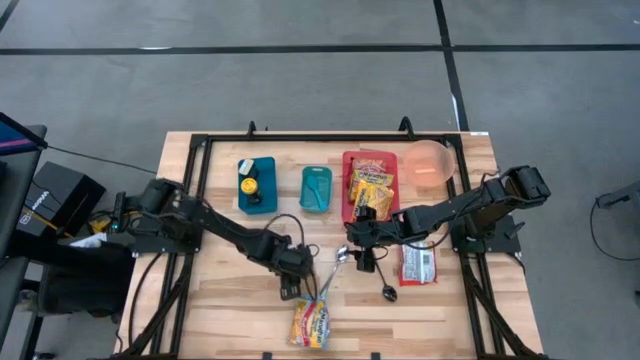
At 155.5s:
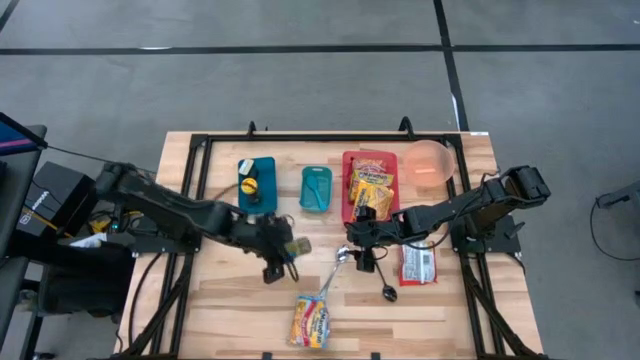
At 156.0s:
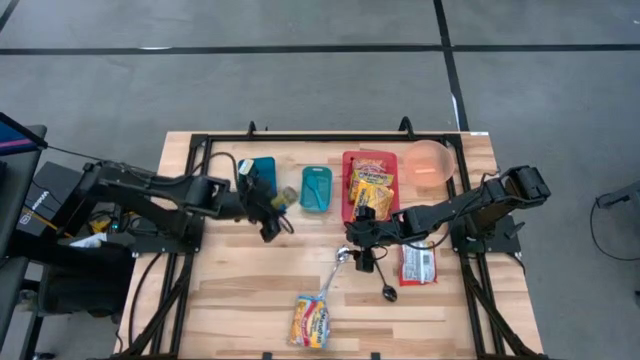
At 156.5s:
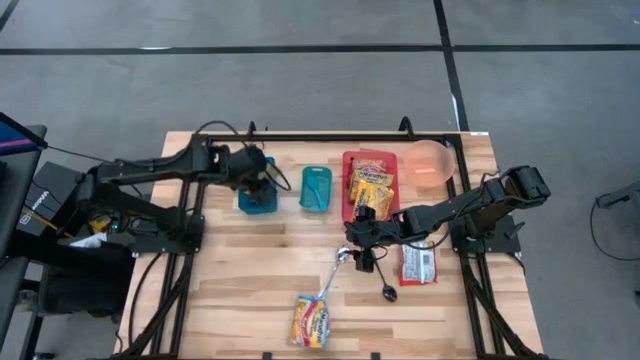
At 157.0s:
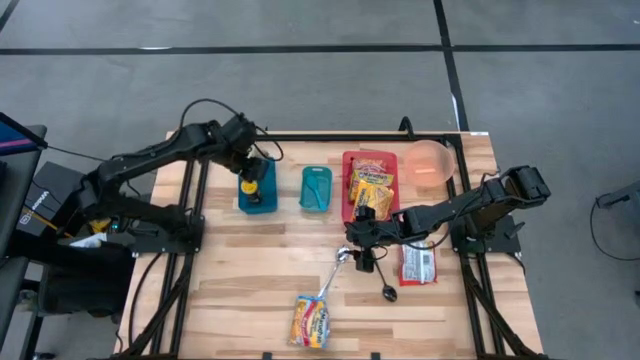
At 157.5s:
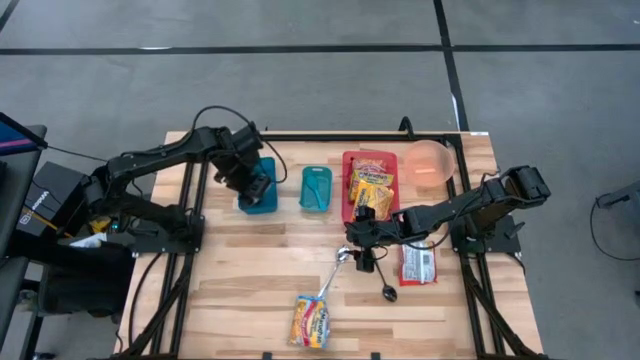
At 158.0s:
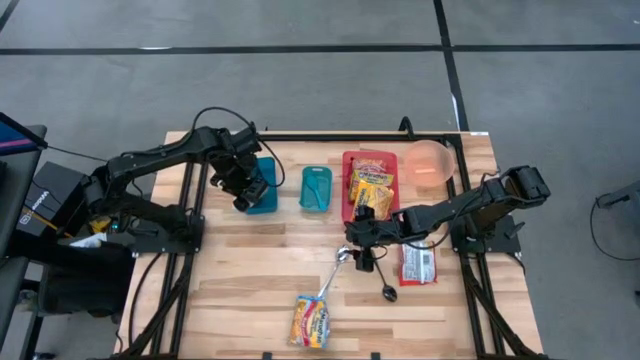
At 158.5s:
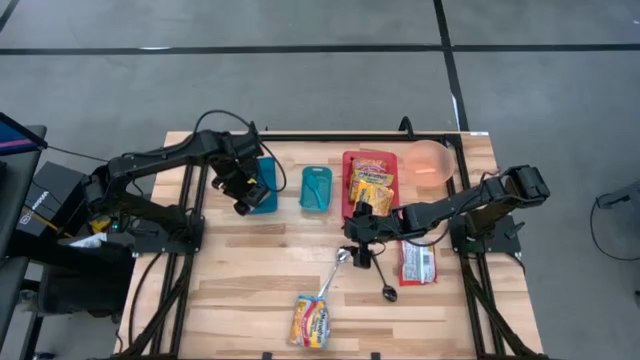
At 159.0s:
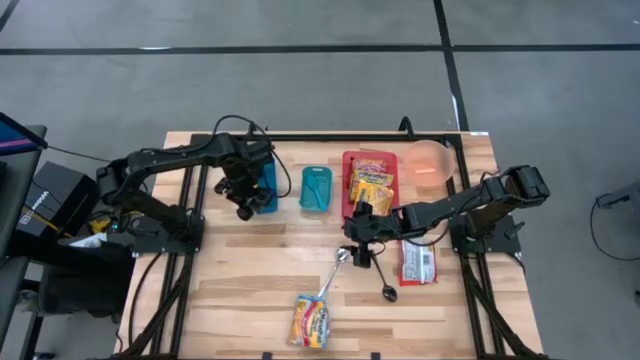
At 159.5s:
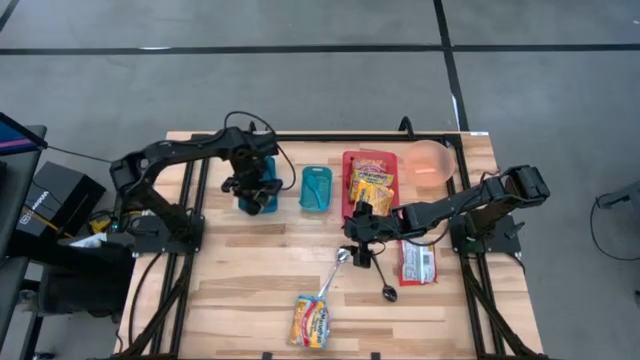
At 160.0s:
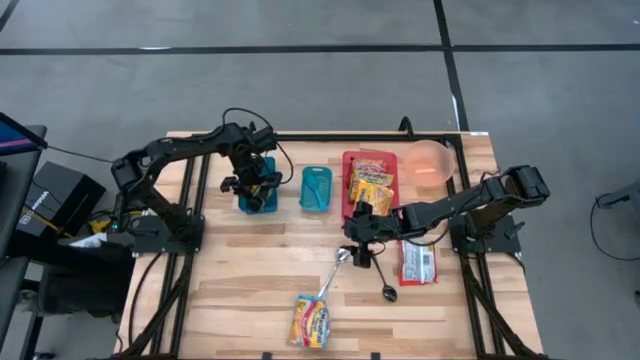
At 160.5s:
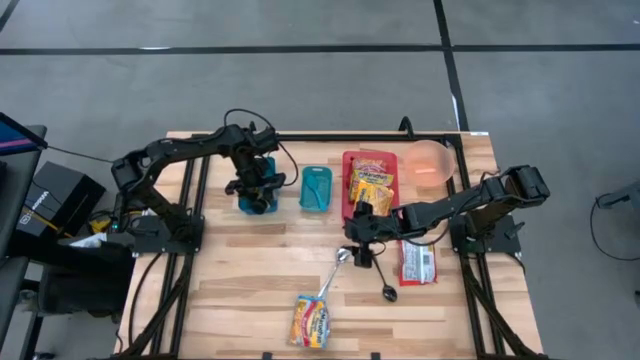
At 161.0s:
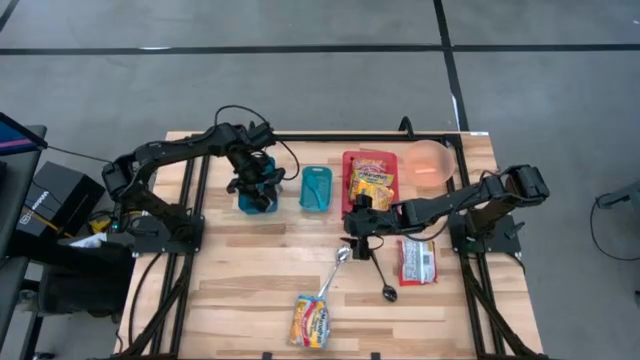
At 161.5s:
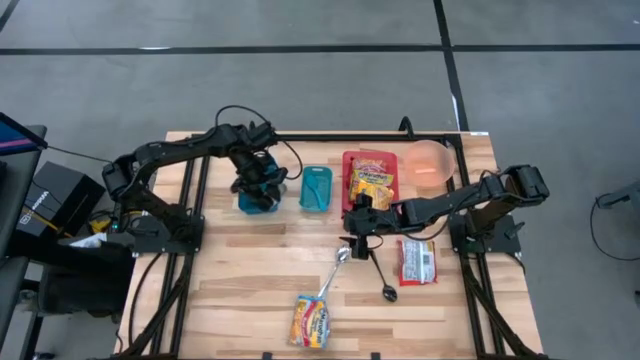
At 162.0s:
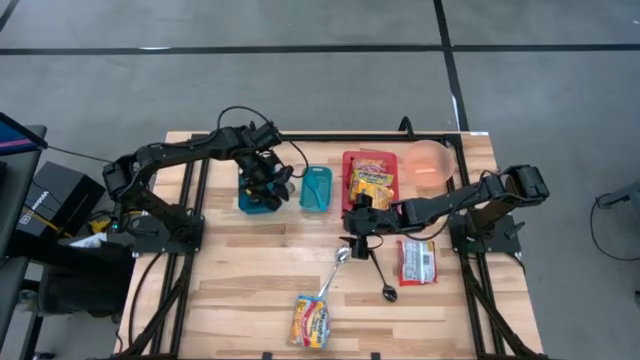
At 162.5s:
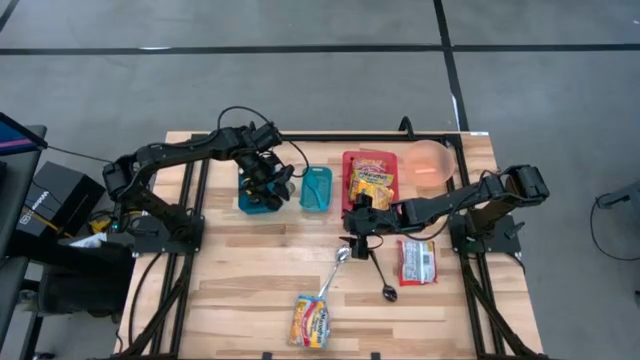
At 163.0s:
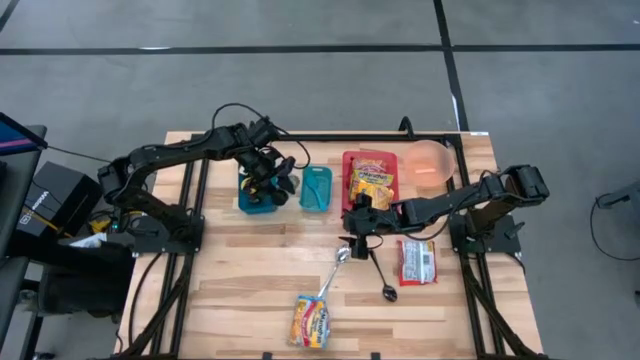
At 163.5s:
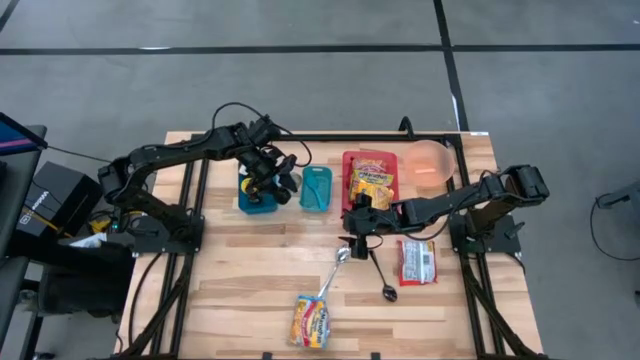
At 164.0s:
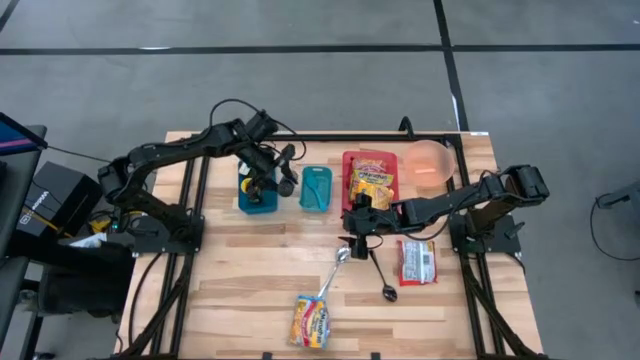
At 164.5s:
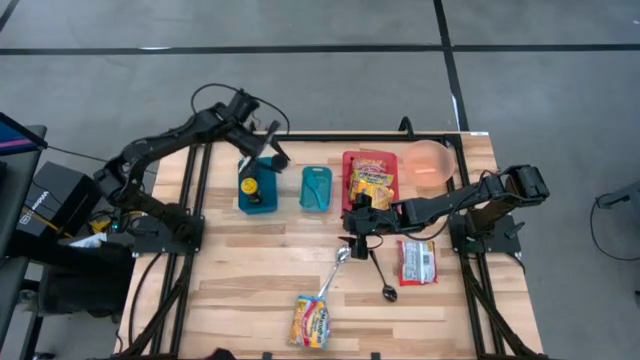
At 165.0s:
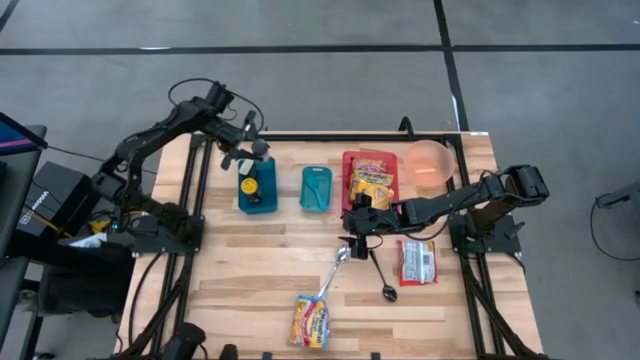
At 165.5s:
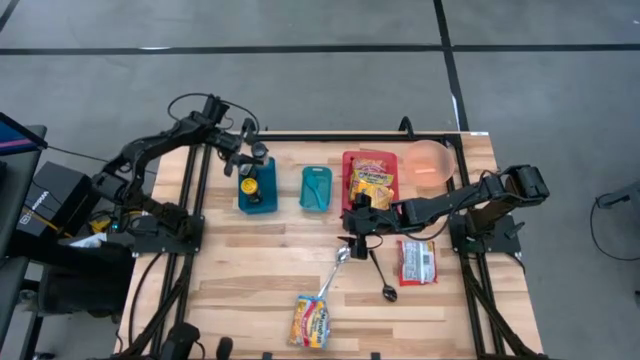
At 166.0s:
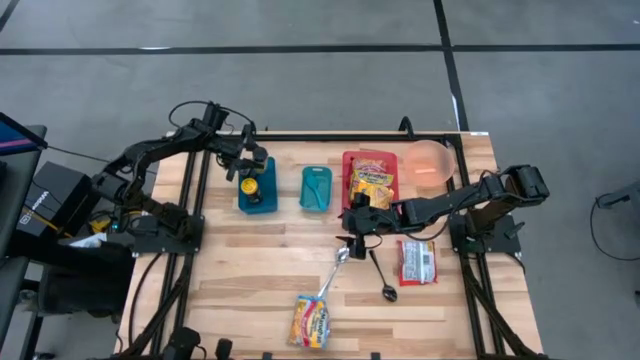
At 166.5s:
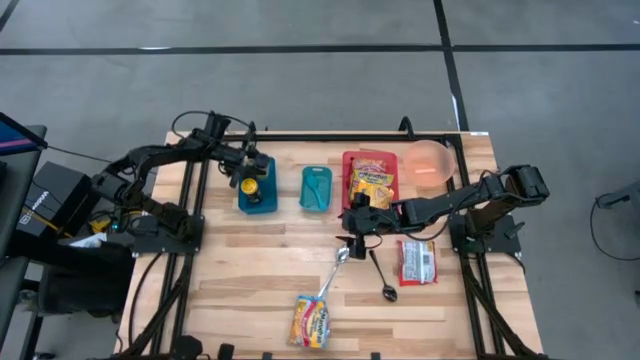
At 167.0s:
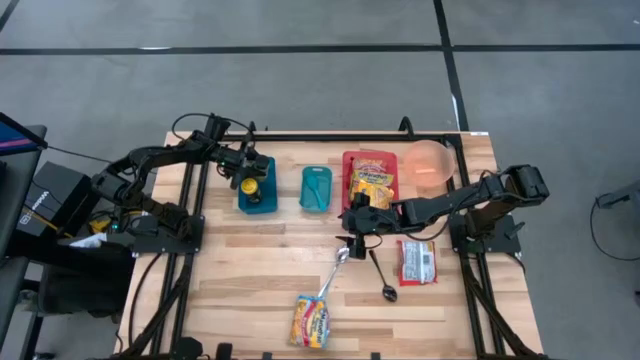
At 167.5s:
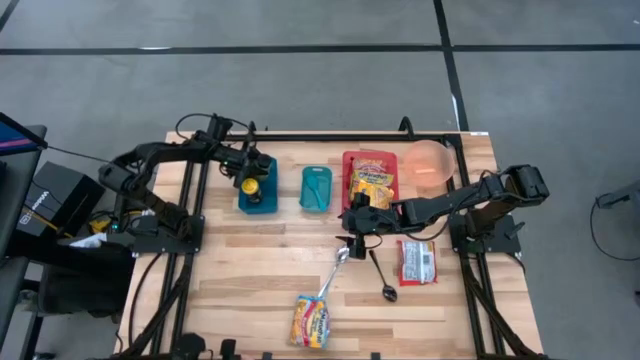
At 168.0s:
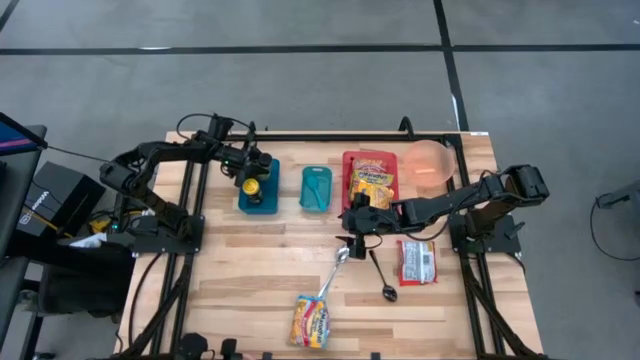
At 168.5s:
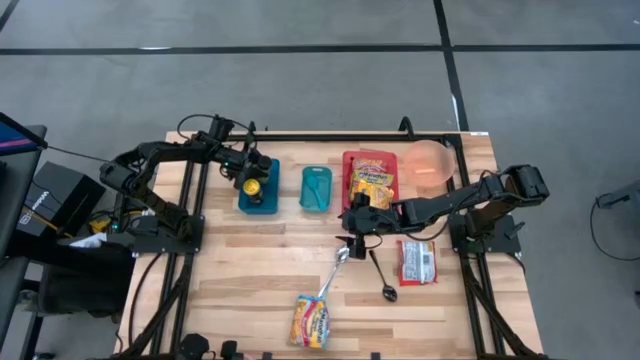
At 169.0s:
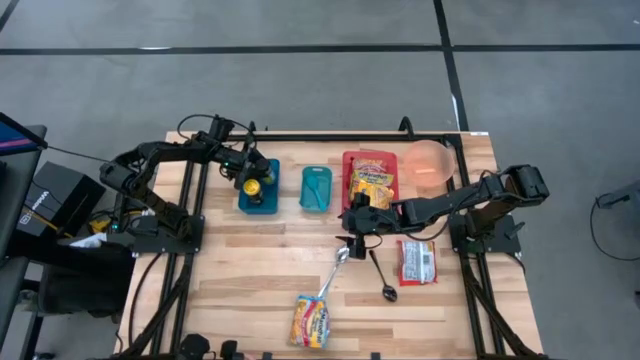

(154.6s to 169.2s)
Task: Pick & Place Food Item
Put the black spice bottle into the blue bin

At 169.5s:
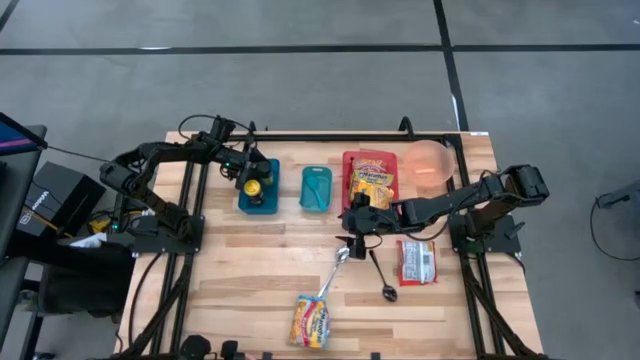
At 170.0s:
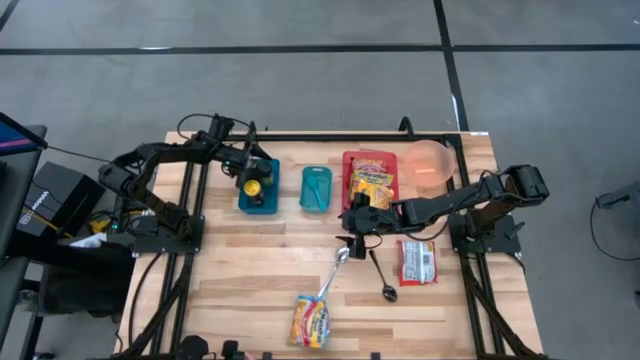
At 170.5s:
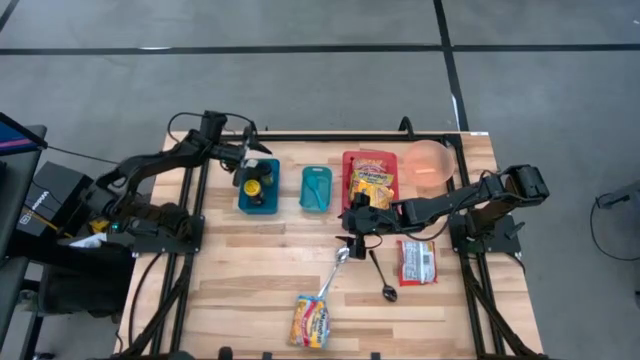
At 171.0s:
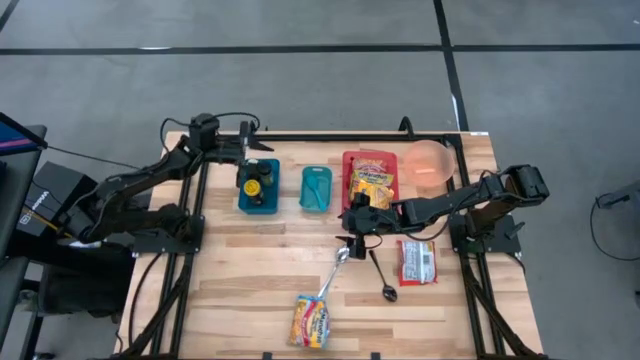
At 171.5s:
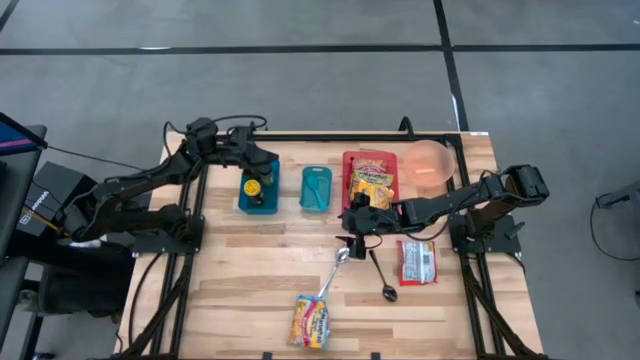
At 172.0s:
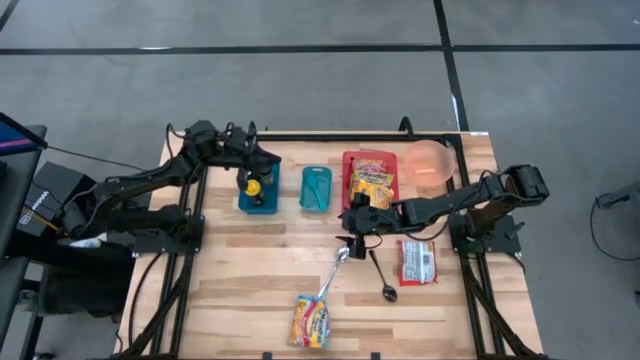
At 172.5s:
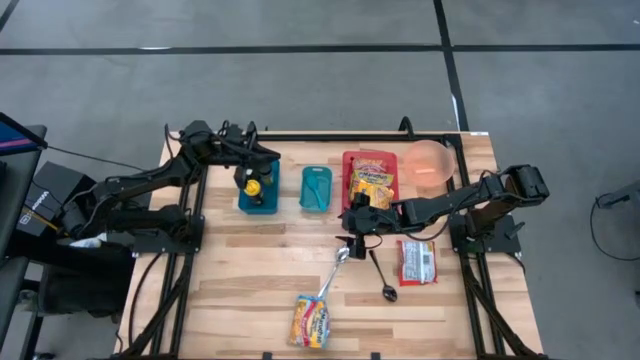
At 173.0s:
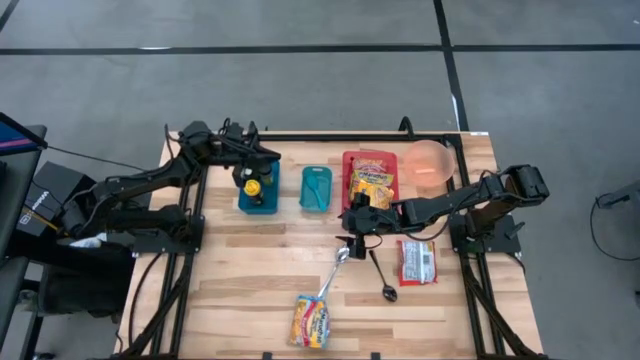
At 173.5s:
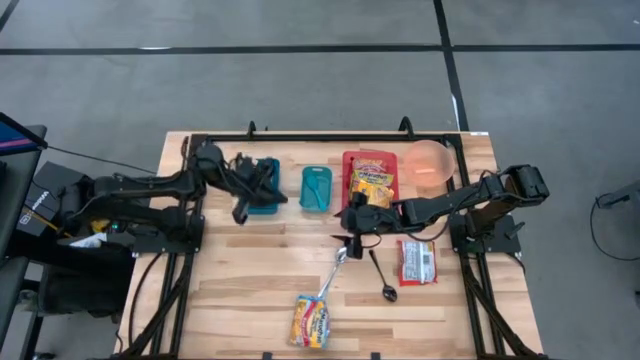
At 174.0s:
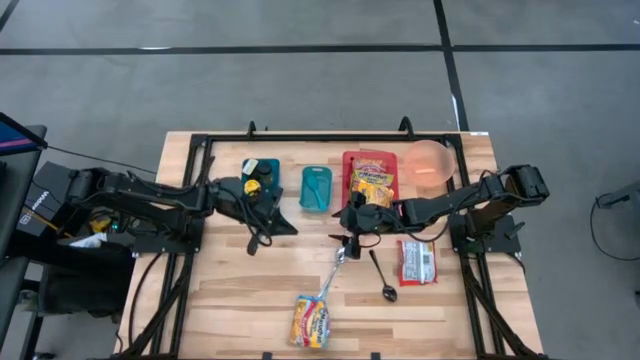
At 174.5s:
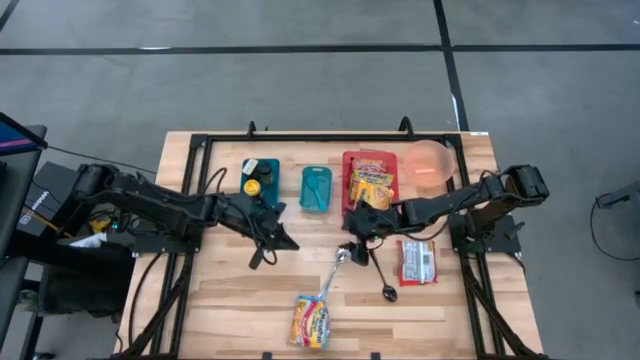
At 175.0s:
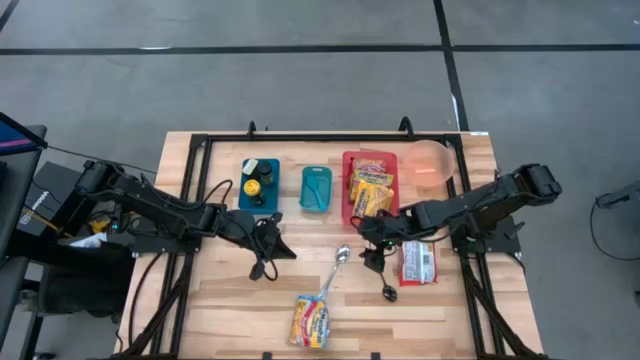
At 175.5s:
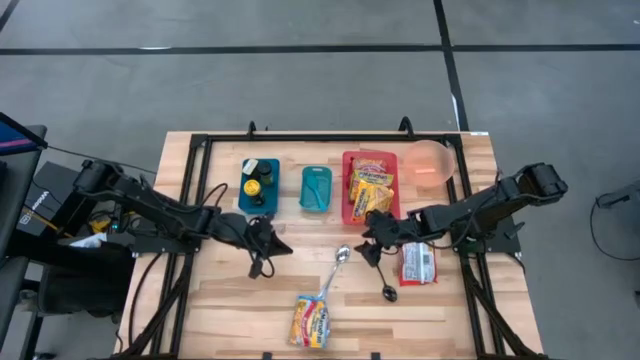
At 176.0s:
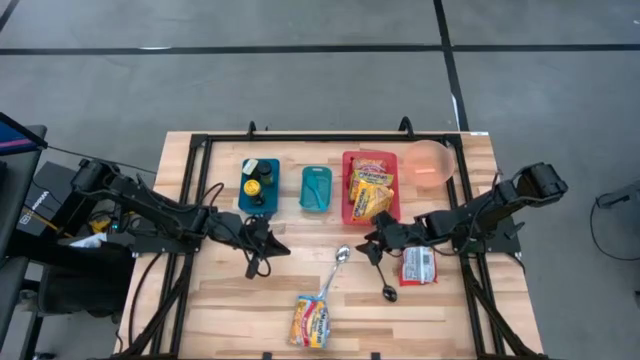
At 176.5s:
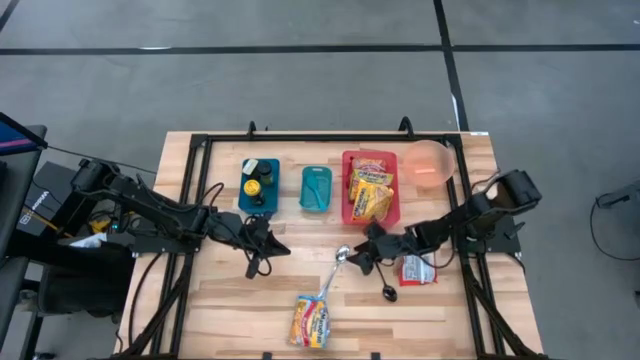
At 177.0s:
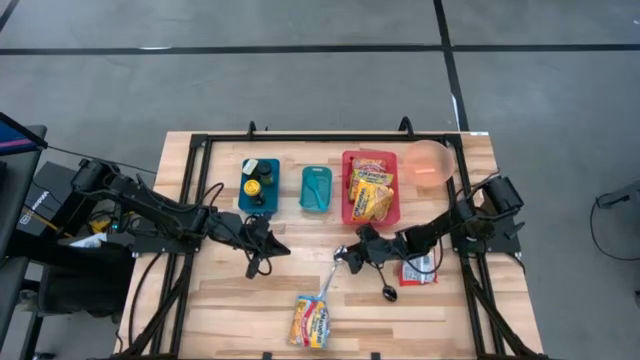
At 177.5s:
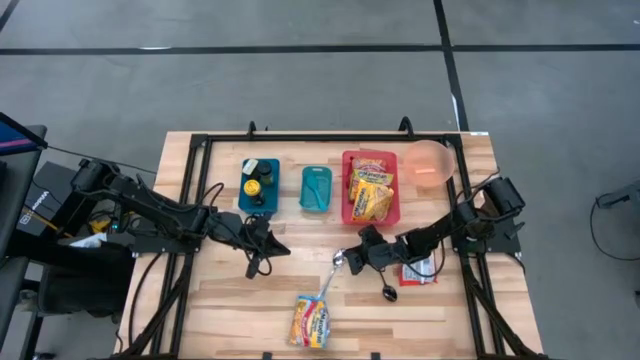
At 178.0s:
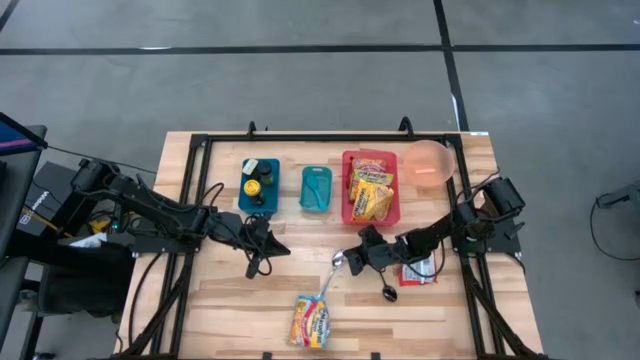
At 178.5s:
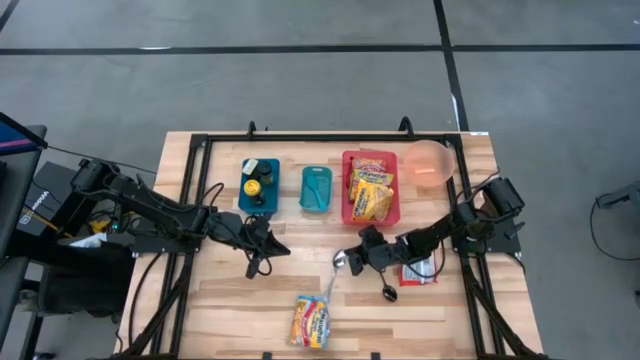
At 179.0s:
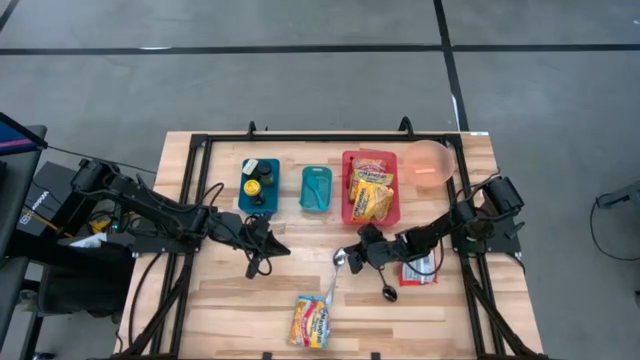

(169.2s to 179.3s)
Put the silver spoon into the green bin
